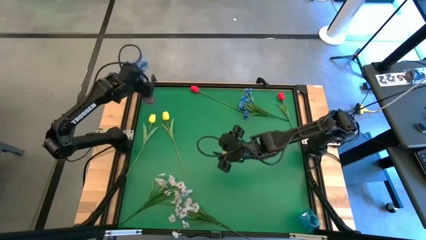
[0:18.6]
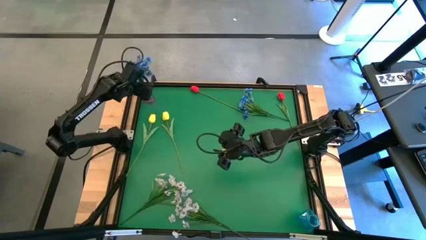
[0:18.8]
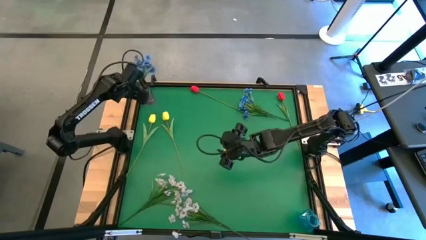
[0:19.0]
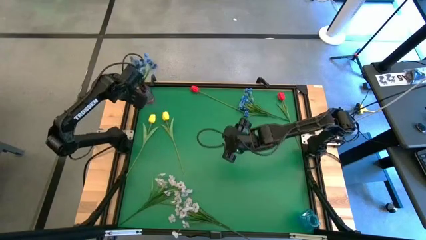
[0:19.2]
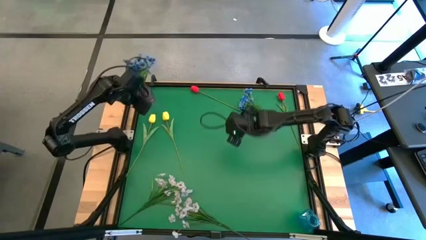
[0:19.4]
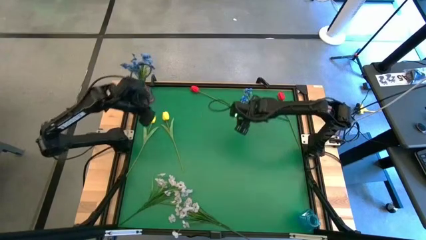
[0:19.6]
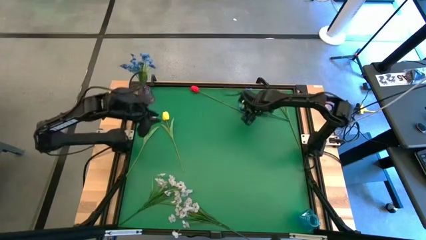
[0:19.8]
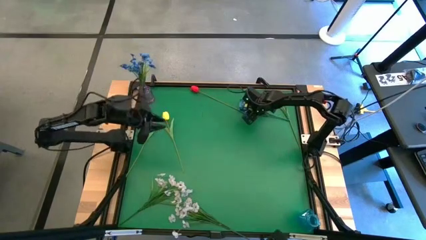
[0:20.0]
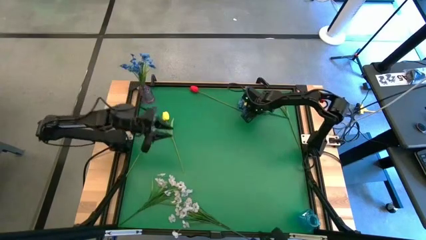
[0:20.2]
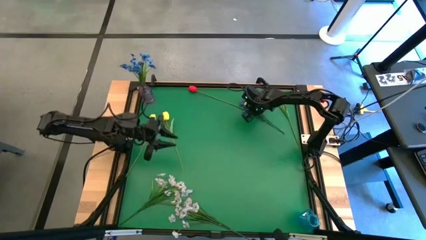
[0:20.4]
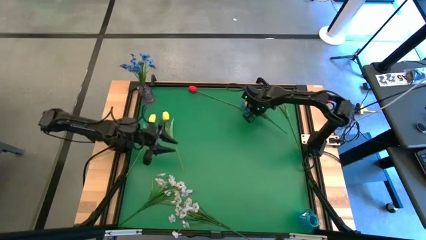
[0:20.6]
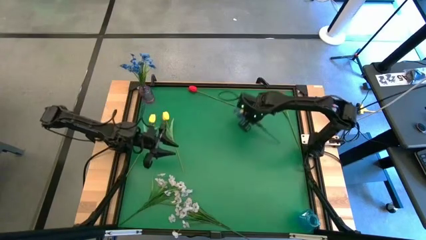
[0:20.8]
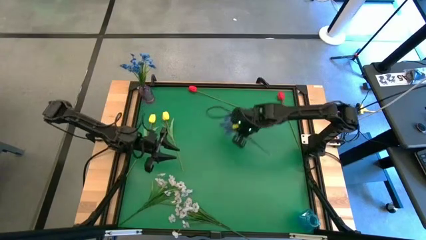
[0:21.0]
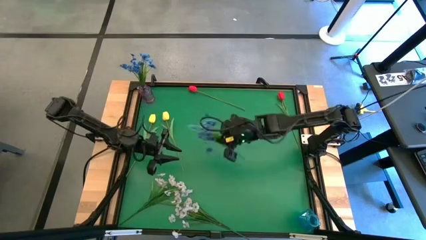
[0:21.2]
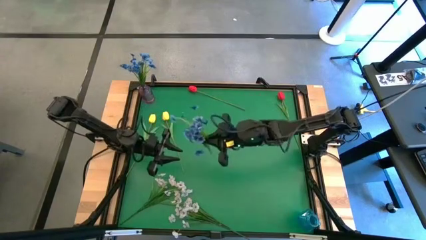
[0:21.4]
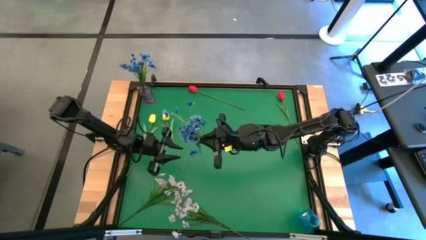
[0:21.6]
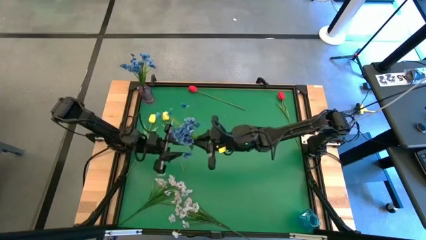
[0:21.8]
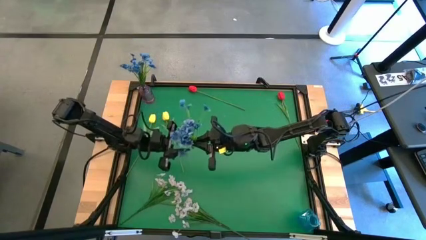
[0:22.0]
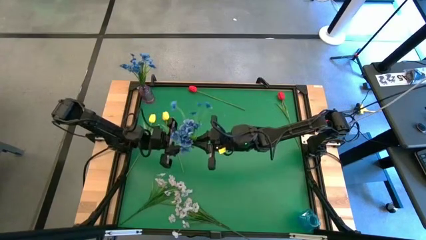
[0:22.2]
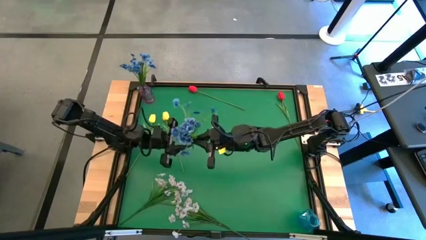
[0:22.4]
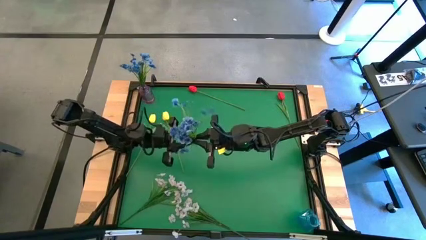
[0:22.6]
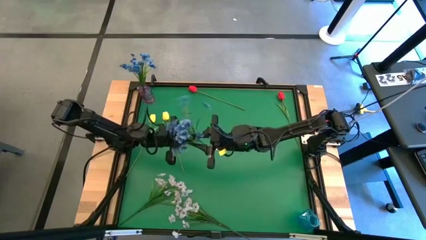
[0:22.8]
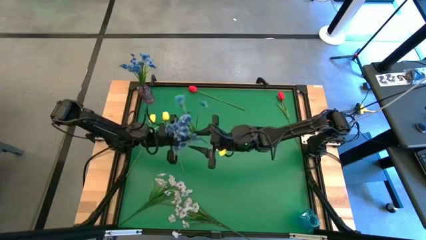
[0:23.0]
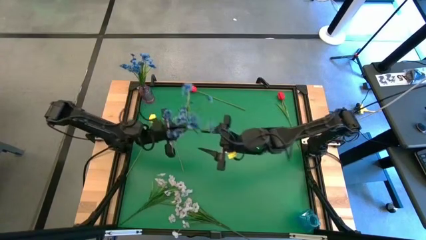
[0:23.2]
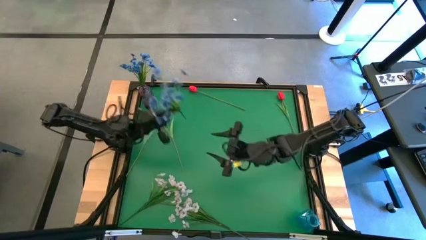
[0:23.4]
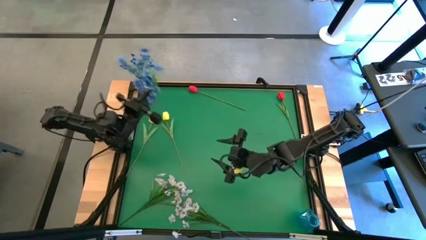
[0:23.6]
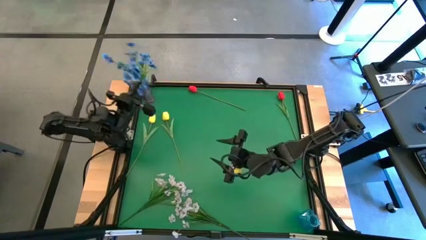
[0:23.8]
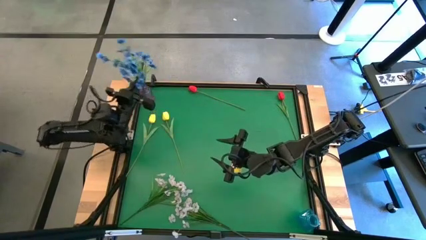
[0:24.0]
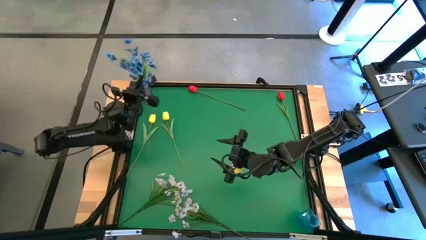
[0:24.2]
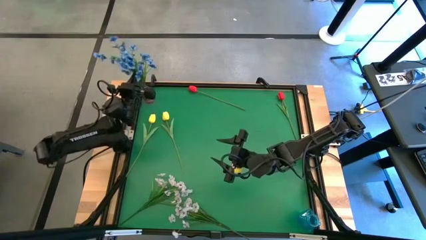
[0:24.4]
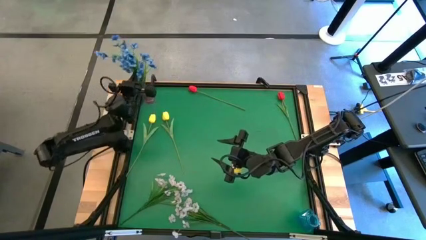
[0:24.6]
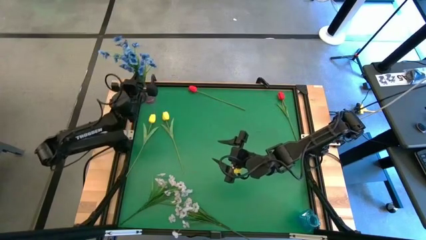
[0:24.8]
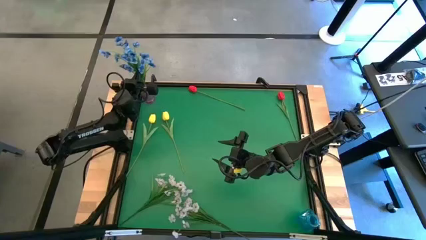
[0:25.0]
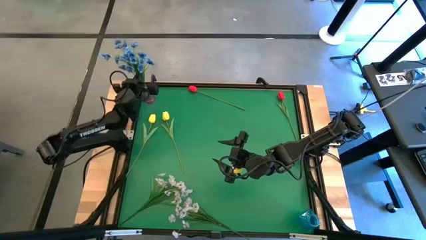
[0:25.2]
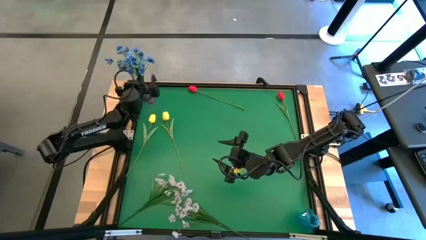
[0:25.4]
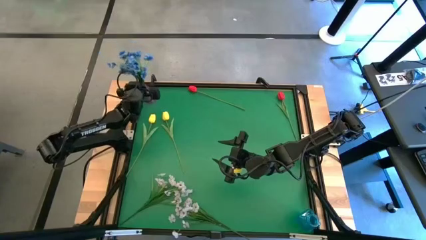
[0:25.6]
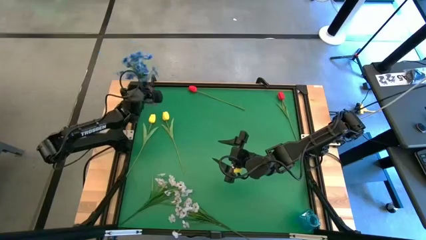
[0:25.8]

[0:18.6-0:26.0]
Task: Sort flowers into vase by color
Put the blue flowers into the blue vase

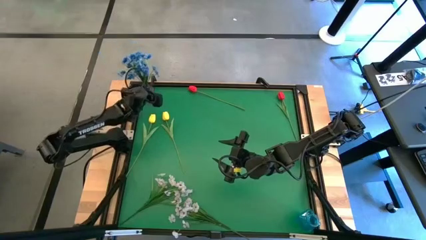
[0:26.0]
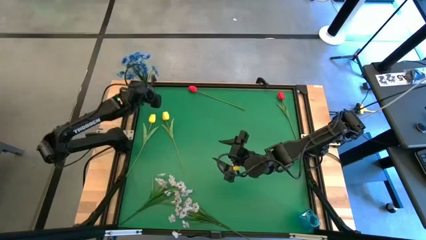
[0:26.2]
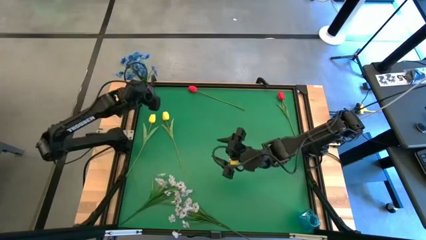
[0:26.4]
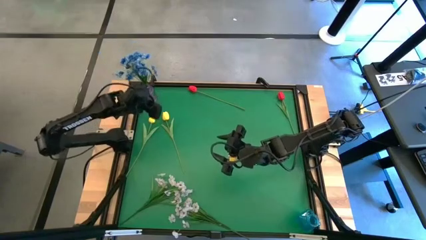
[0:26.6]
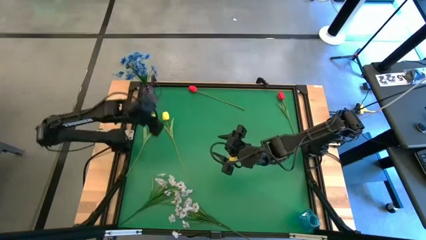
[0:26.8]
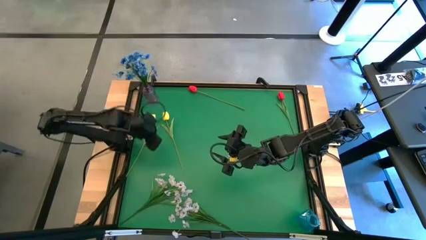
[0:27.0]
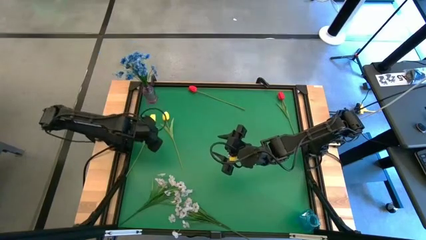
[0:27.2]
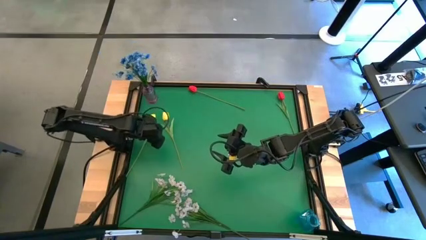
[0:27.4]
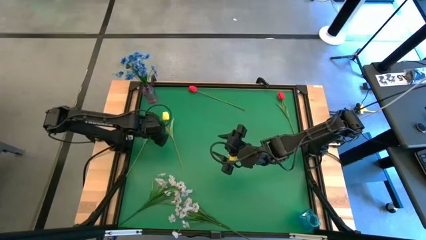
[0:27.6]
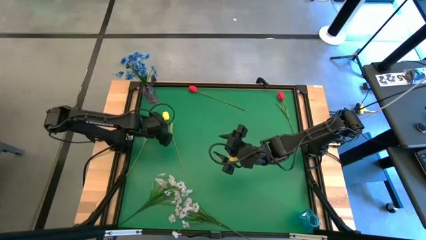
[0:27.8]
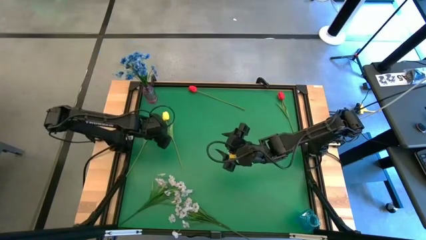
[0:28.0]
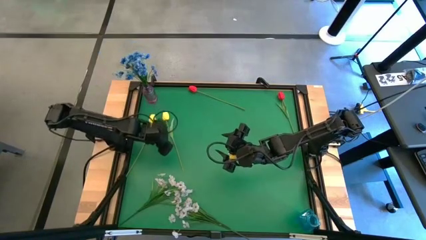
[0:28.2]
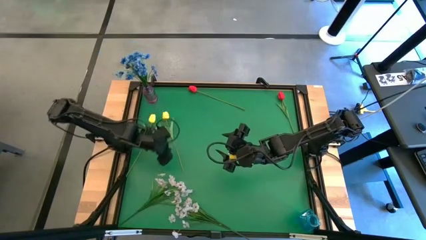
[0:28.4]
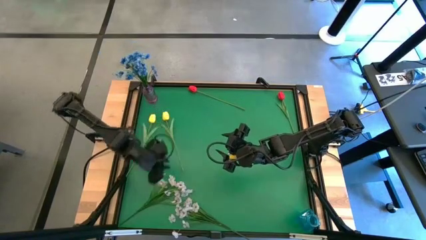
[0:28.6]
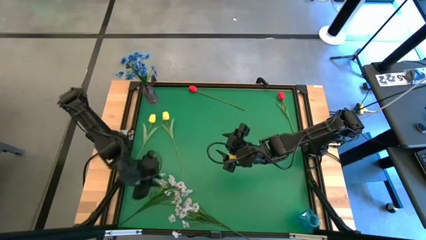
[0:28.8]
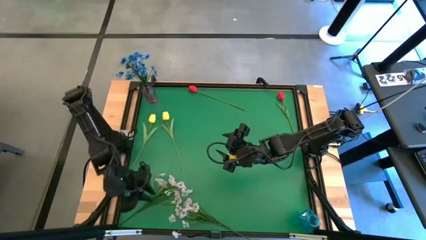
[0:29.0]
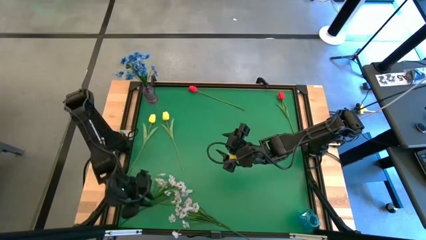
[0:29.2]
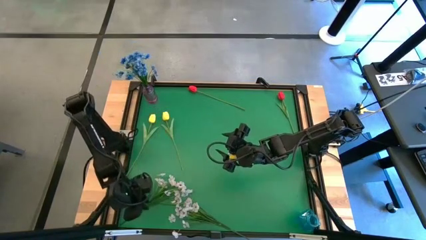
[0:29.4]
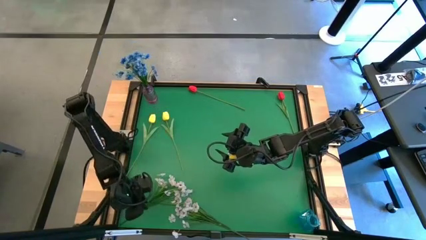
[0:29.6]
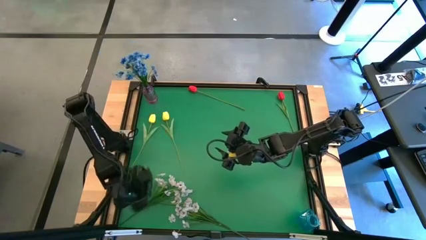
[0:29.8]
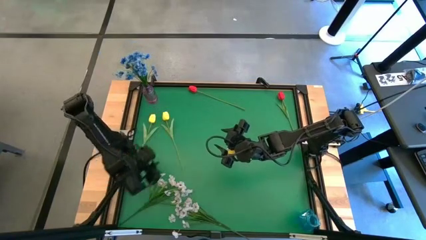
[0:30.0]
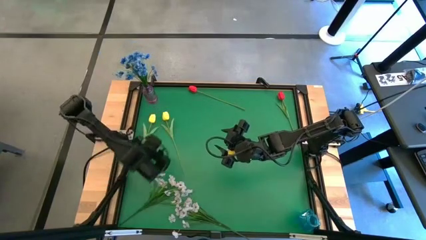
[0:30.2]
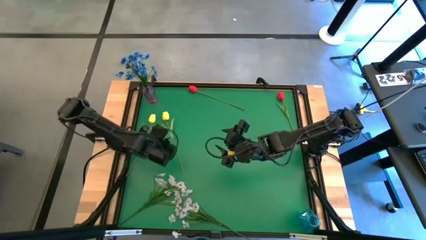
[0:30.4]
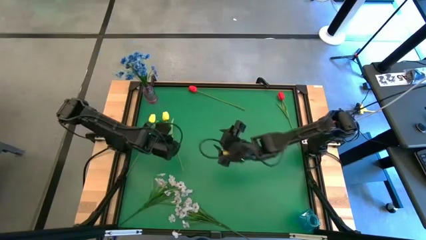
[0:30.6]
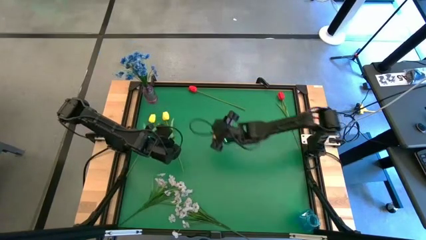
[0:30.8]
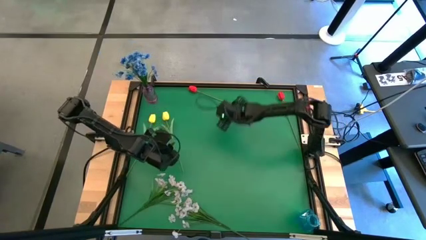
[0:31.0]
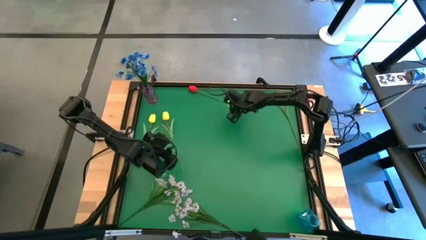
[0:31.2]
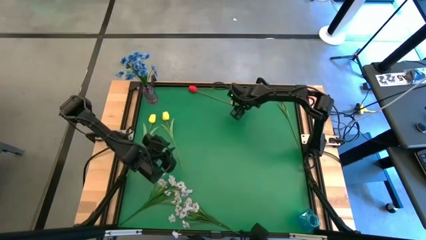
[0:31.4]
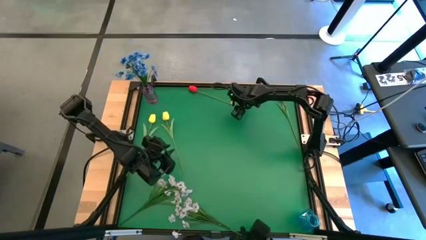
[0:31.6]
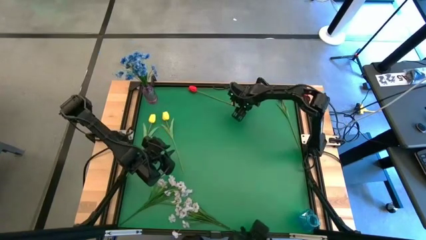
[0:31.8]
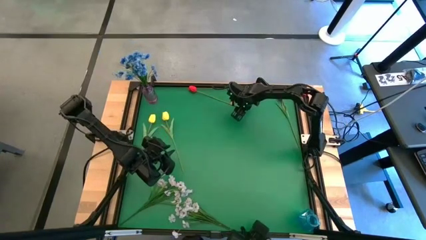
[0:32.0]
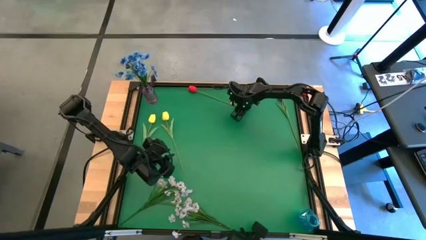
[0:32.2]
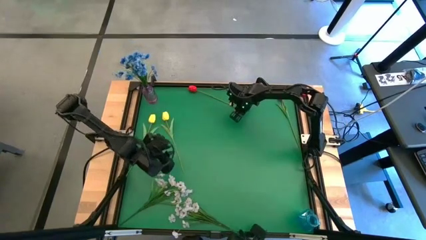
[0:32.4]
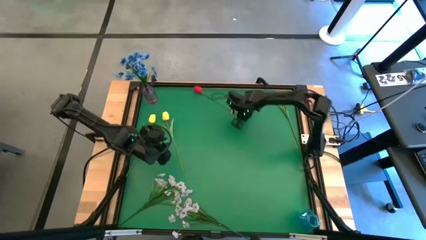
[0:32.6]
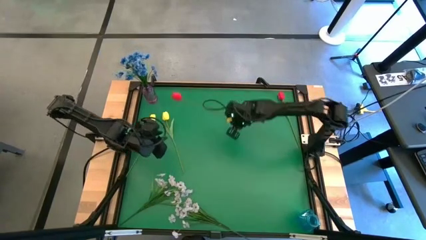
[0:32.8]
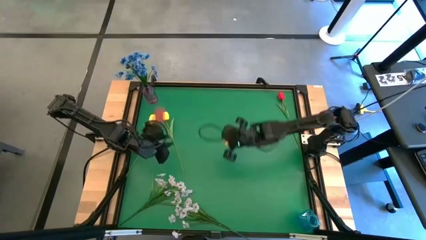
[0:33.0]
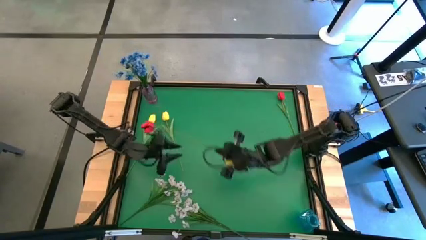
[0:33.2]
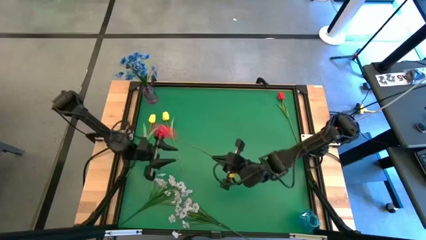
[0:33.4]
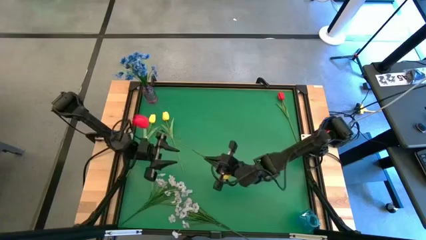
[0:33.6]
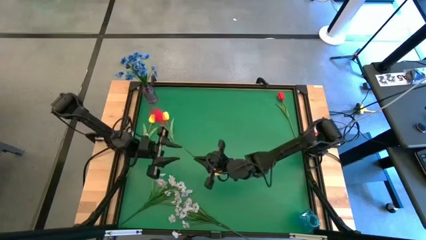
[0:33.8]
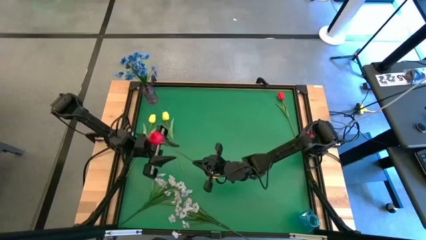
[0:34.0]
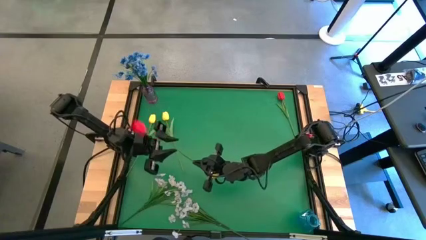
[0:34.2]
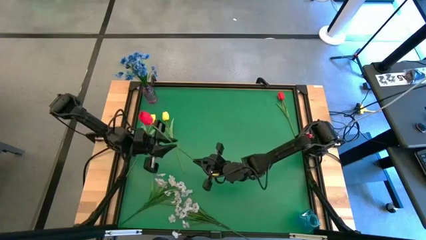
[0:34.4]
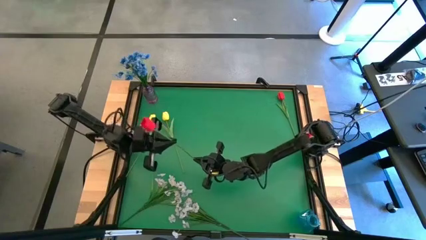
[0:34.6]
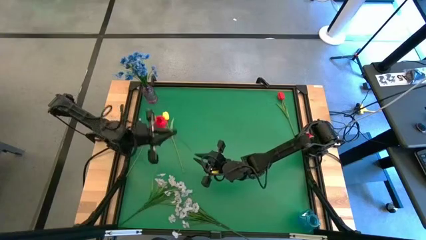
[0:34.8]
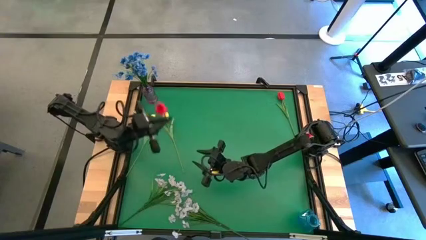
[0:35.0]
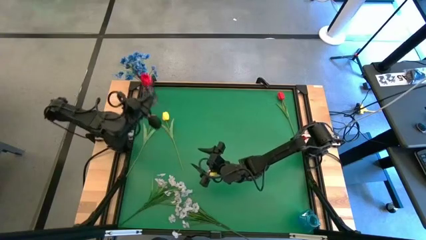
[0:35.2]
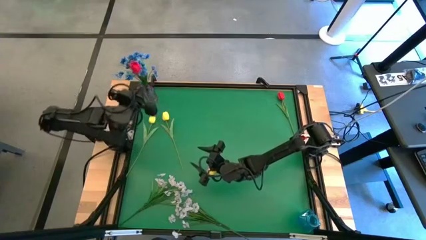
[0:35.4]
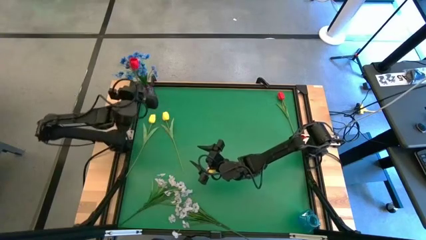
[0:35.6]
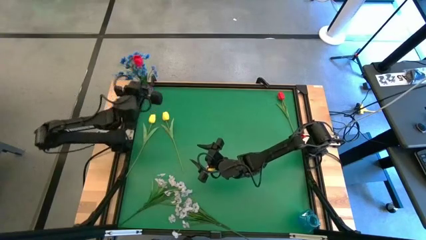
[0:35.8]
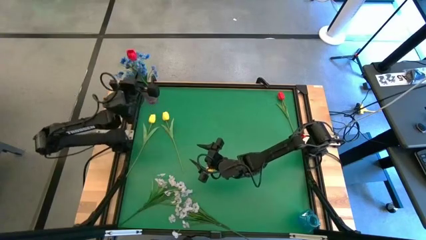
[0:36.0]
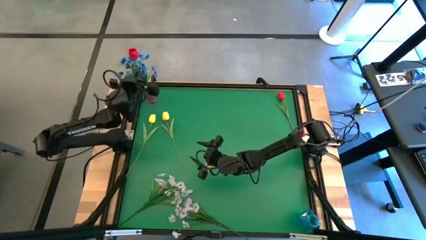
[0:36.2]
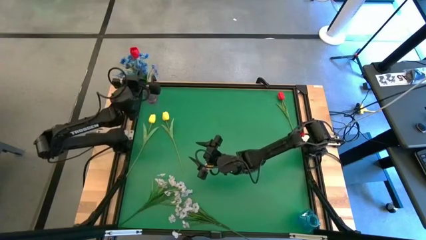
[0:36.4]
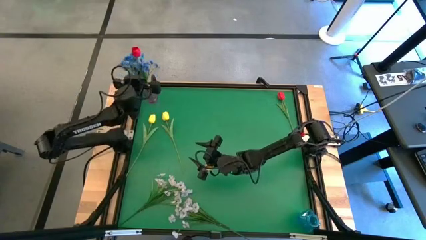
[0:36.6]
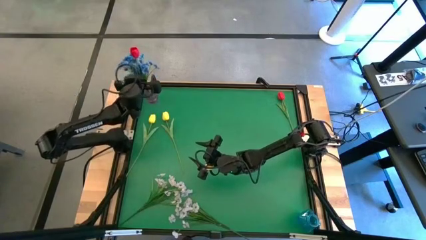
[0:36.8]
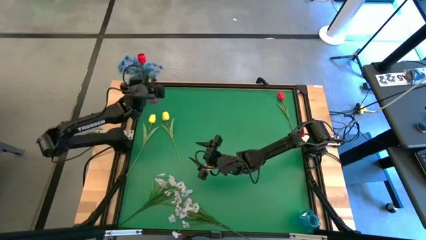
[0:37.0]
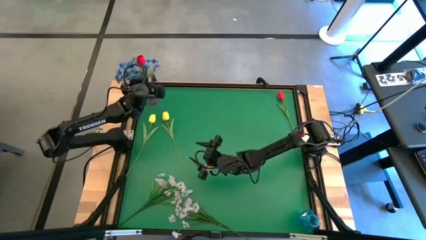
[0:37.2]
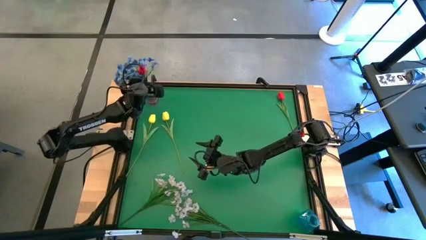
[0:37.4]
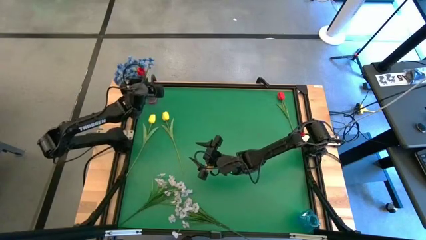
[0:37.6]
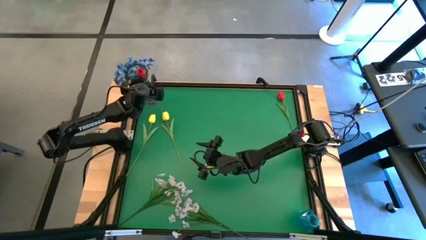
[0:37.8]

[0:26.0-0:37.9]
Put the left red into flower the purple vase
